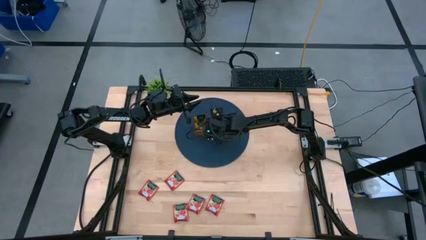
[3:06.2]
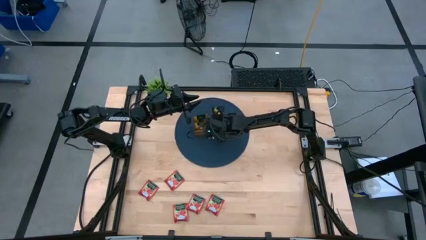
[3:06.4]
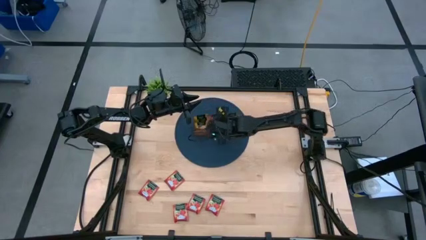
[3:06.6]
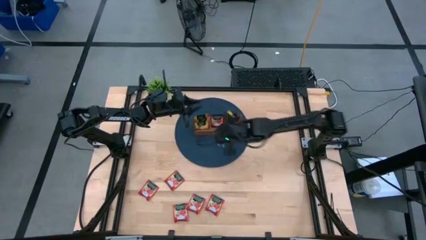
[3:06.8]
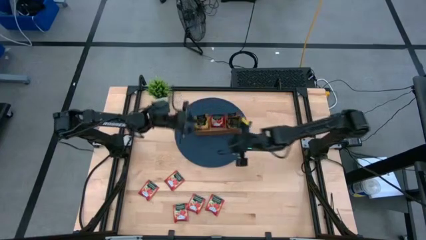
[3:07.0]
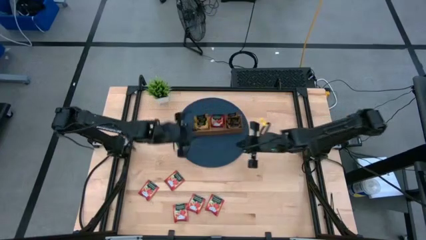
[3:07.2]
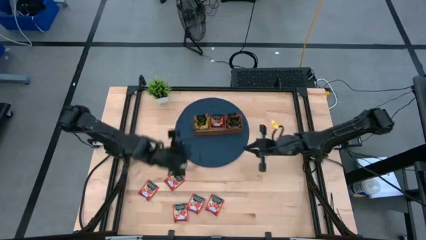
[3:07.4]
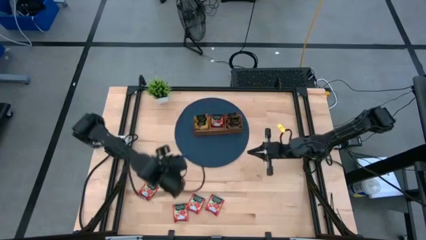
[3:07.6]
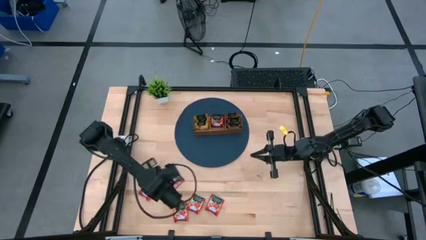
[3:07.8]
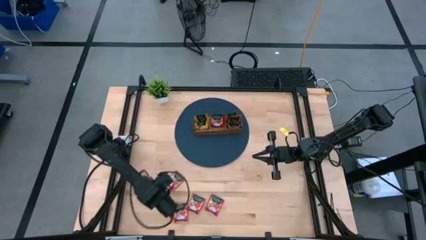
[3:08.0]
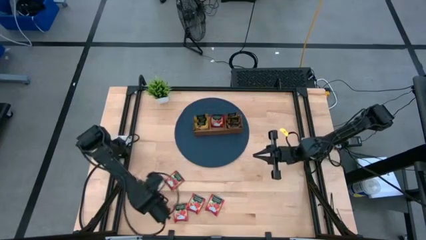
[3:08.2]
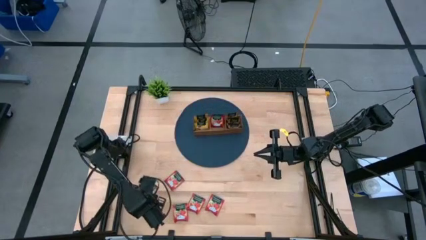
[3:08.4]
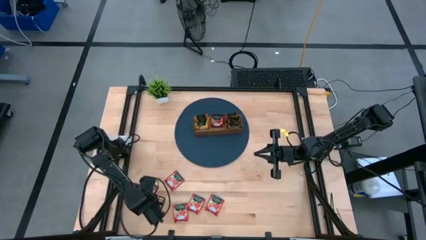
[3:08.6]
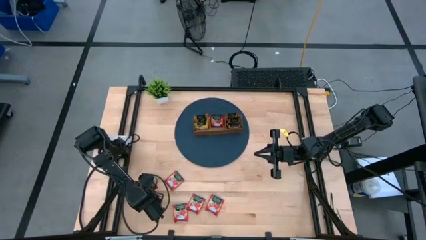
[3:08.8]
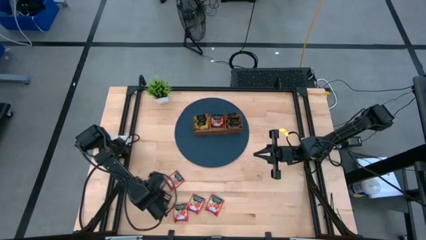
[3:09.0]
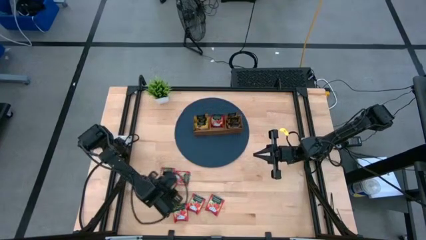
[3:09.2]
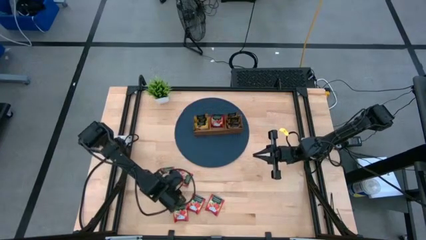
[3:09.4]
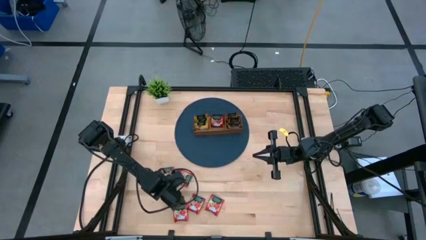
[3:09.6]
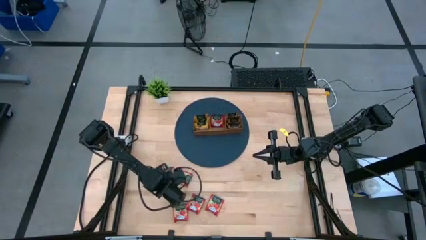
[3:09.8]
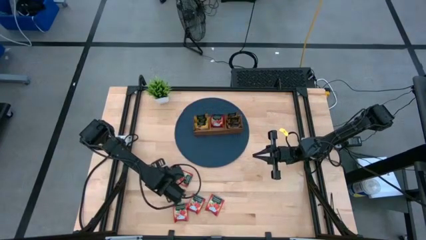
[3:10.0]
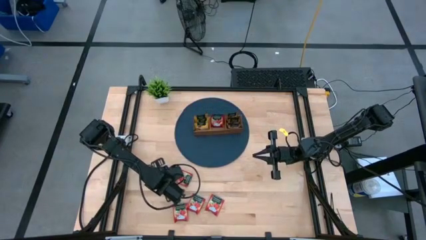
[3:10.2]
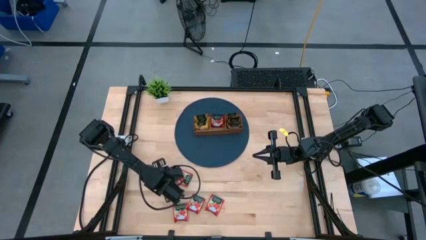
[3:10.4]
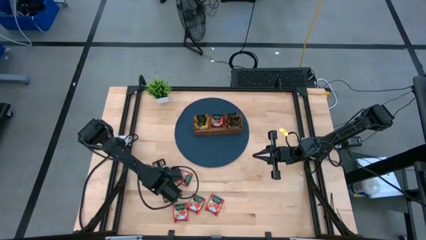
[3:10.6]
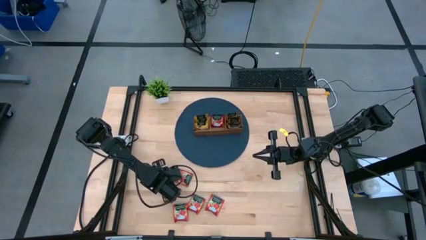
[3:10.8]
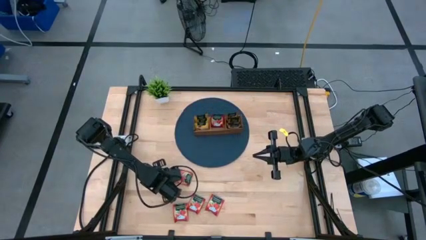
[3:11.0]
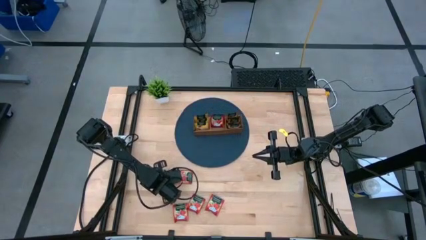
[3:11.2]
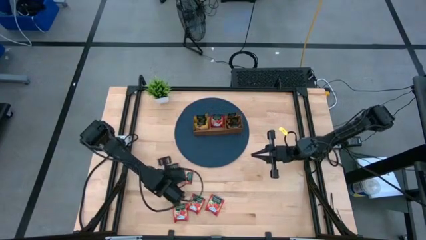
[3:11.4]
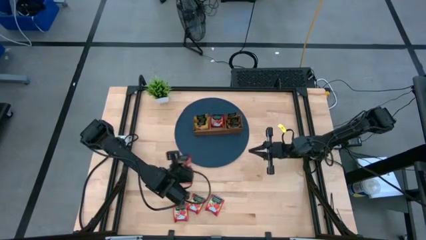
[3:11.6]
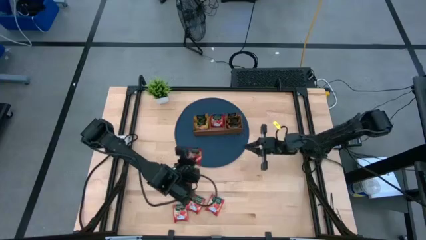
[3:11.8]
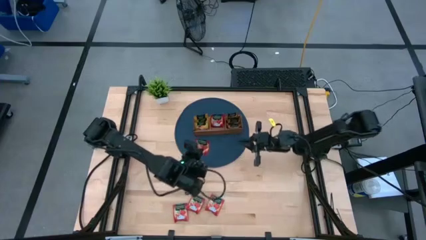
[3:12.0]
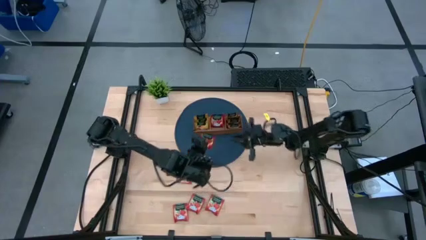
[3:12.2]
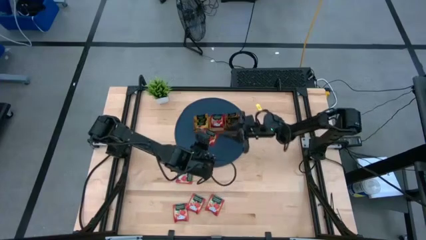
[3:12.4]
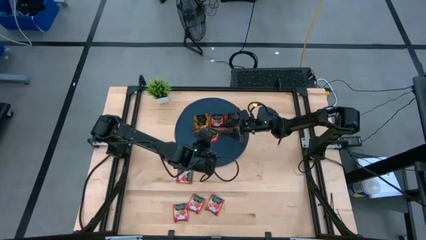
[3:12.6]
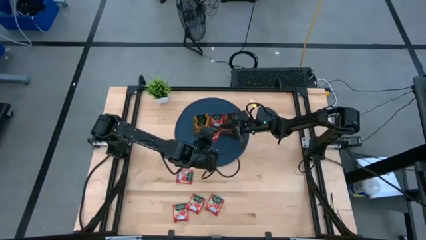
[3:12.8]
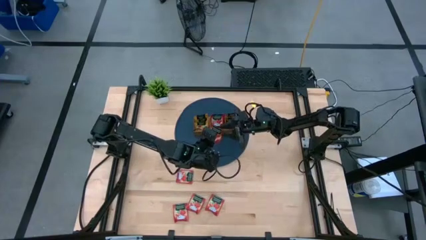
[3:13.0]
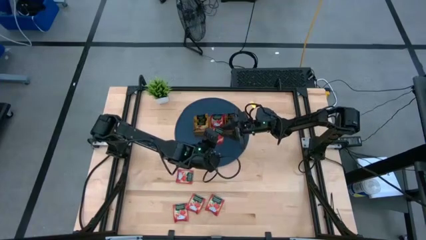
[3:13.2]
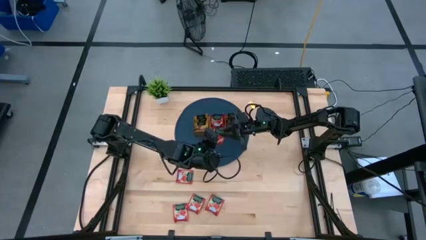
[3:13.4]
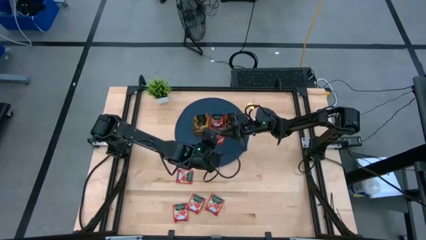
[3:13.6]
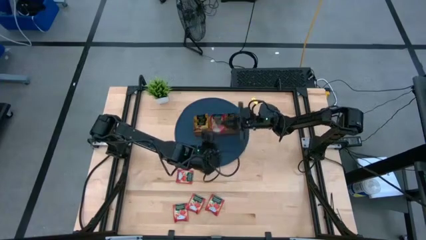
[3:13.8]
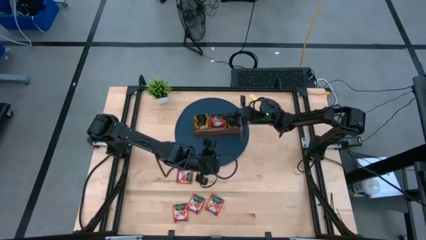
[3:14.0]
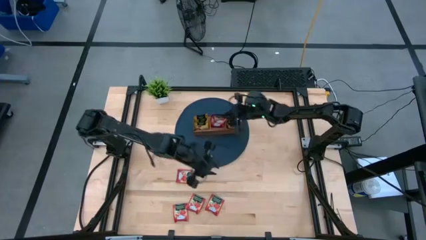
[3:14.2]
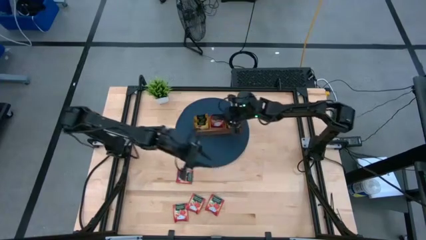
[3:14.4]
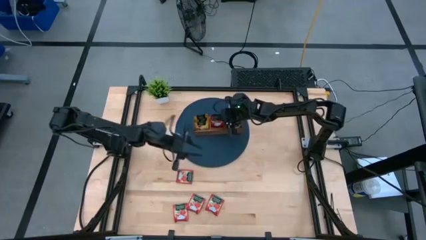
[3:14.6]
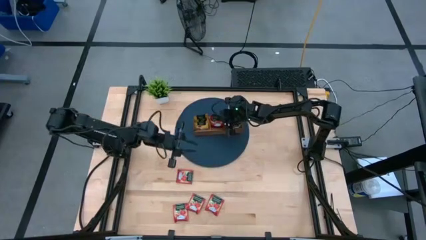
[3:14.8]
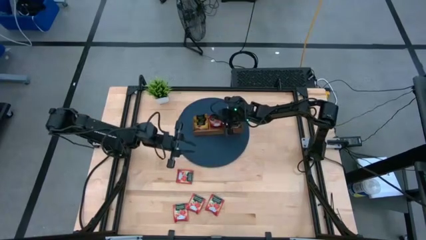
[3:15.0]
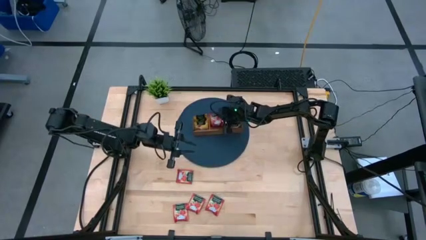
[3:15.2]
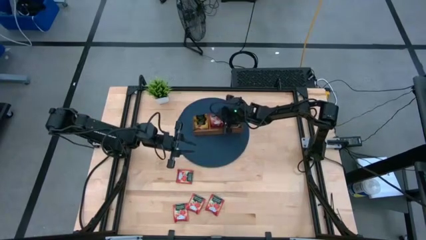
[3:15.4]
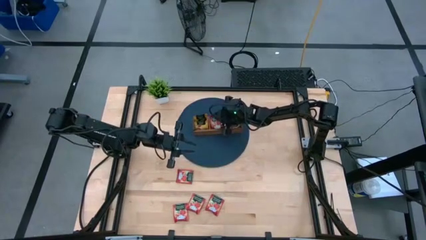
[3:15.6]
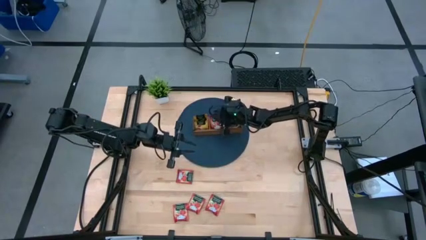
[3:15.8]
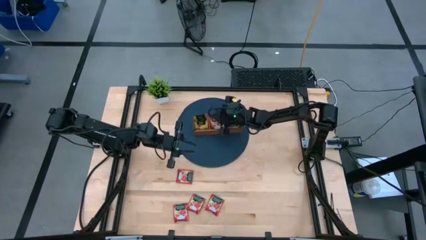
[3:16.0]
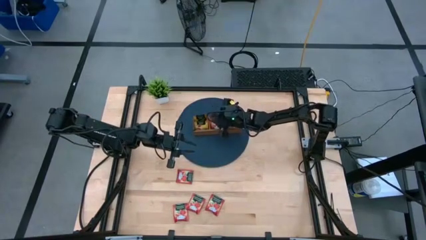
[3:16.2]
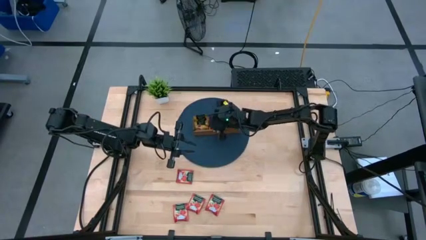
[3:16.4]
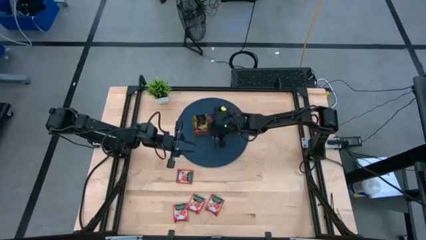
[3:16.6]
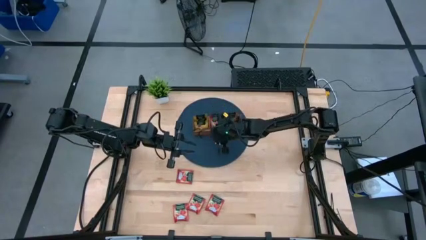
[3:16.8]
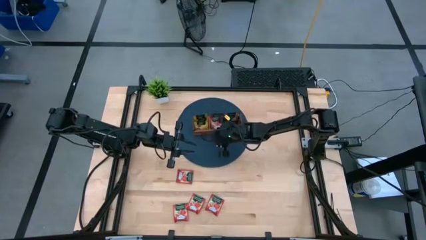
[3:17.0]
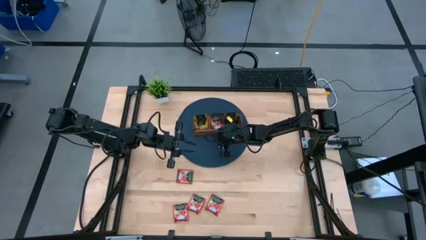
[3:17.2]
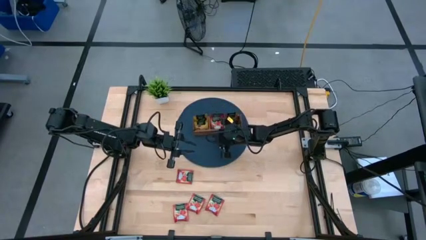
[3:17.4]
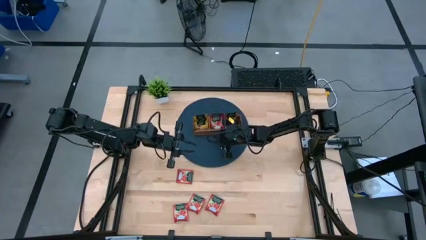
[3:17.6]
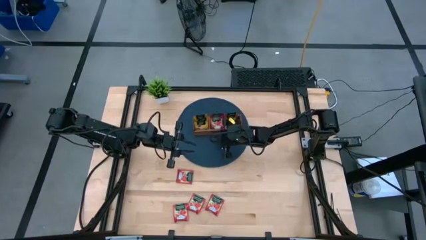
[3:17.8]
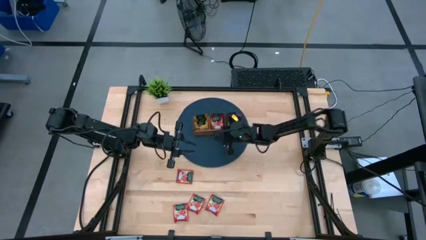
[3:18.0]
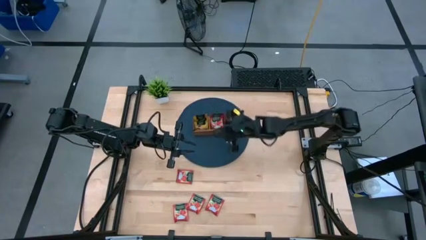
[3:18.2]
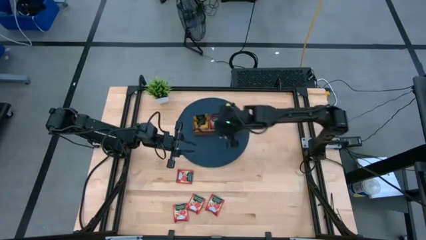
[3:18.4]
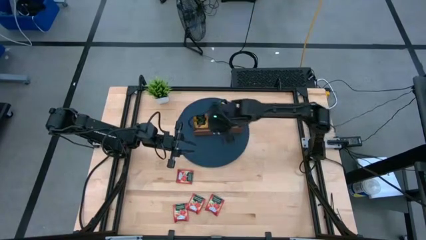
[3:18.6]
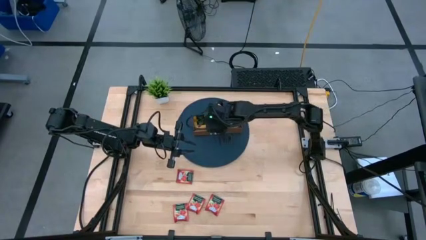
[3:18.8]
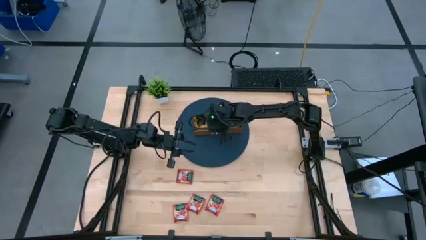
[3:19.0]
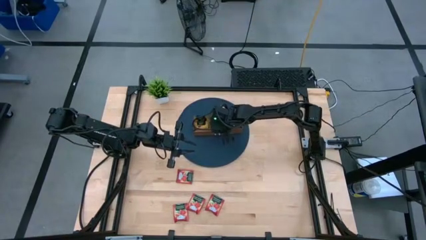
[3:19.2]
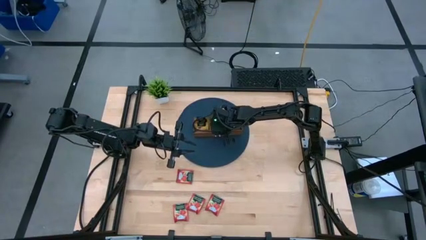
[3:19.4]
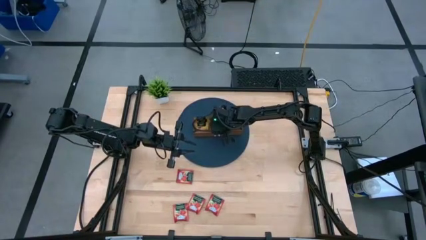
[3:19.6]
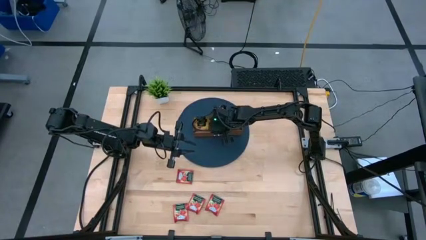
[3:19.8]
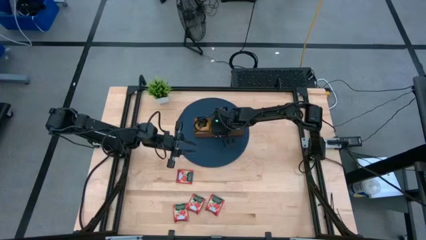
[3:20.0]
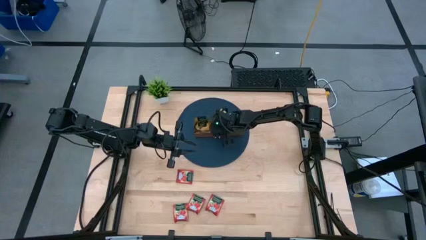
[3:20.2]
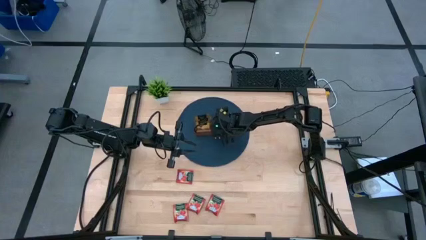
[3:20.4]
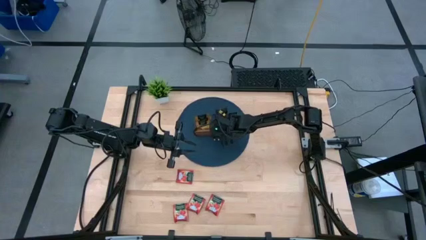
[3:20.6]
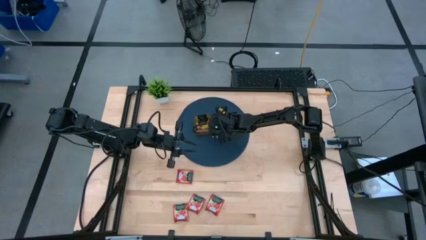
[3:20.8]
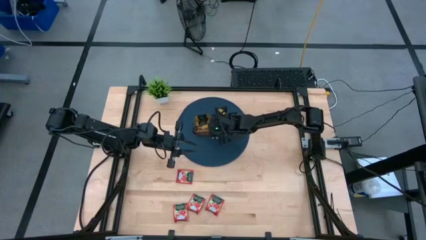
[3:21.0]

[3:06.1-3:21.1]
Task: Pick & Place Tea
Put the red tea bag into the middle section of the wooden organizer
